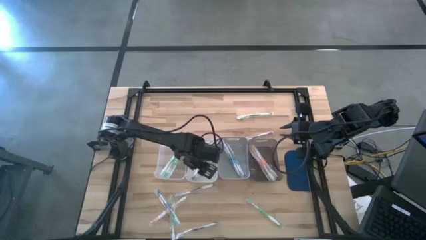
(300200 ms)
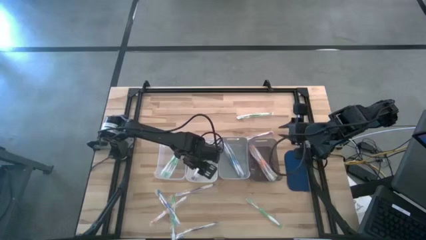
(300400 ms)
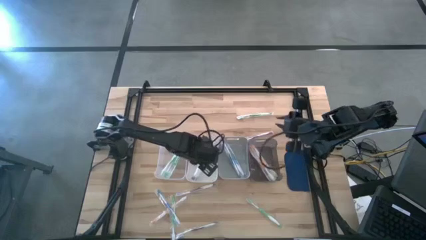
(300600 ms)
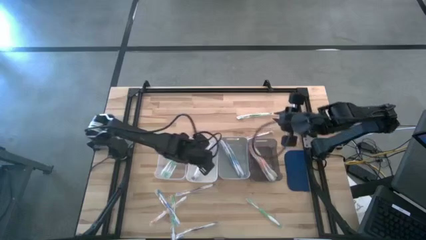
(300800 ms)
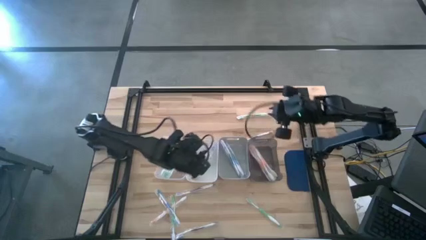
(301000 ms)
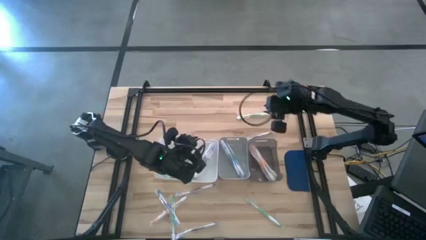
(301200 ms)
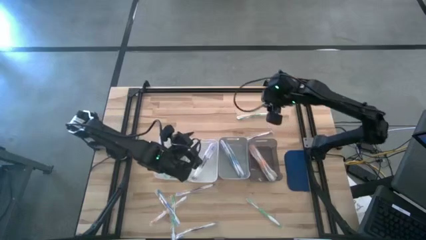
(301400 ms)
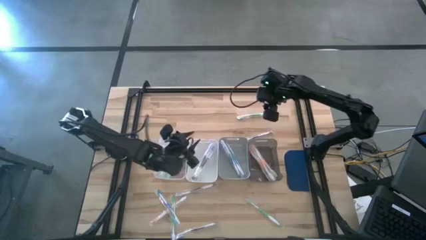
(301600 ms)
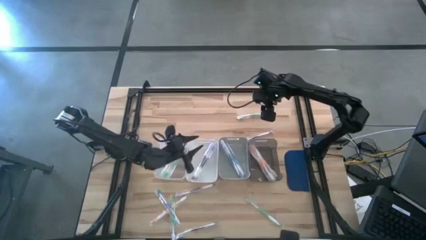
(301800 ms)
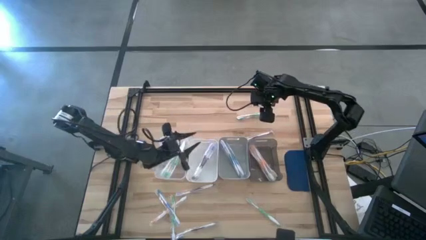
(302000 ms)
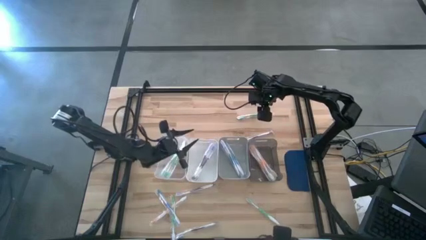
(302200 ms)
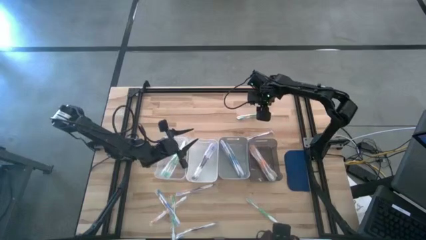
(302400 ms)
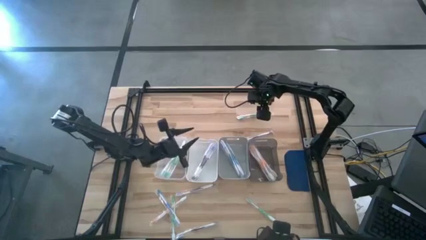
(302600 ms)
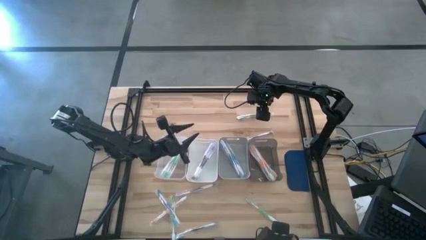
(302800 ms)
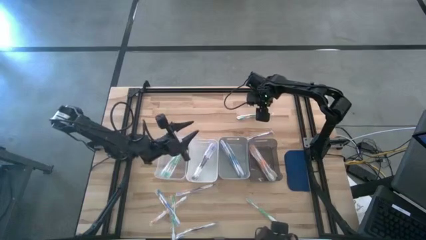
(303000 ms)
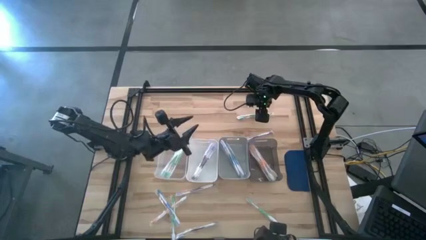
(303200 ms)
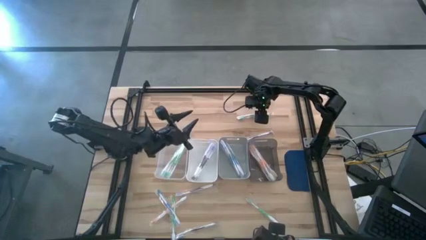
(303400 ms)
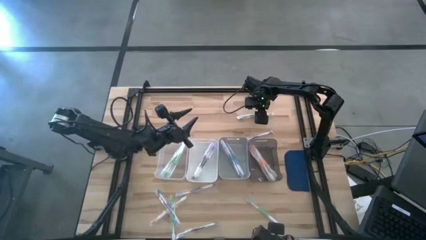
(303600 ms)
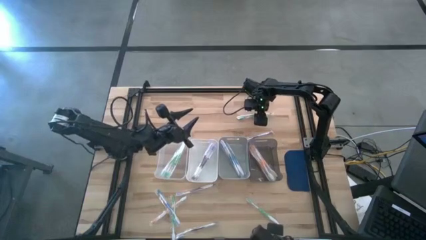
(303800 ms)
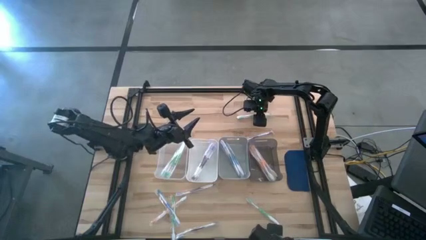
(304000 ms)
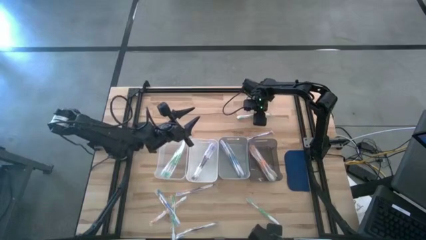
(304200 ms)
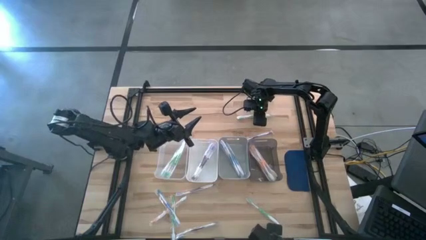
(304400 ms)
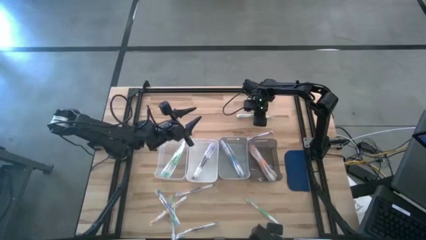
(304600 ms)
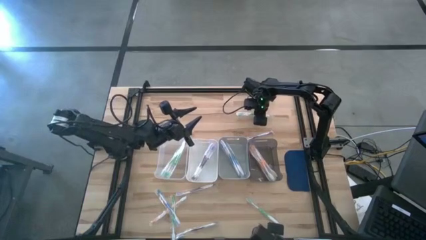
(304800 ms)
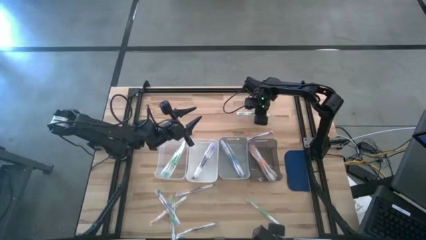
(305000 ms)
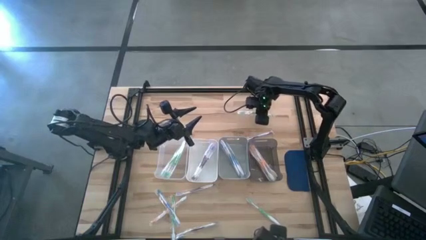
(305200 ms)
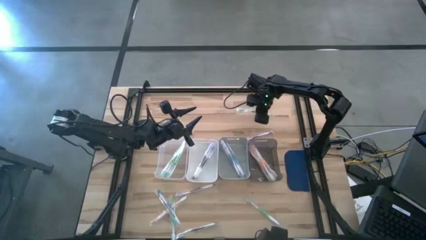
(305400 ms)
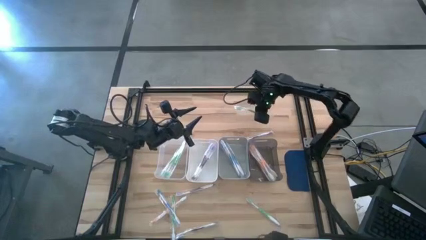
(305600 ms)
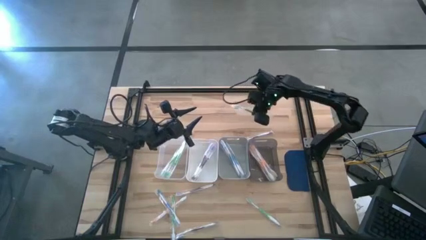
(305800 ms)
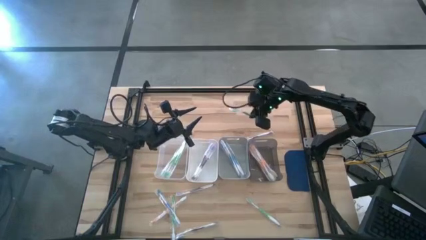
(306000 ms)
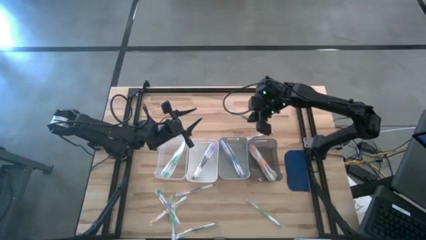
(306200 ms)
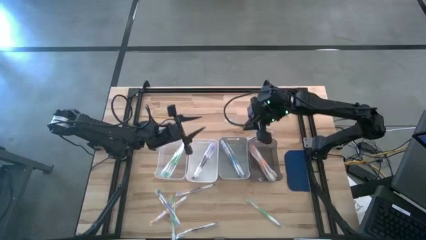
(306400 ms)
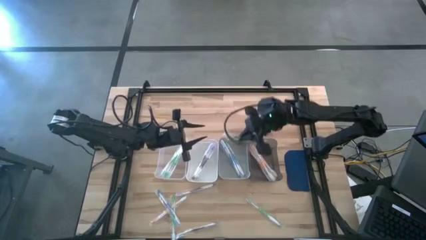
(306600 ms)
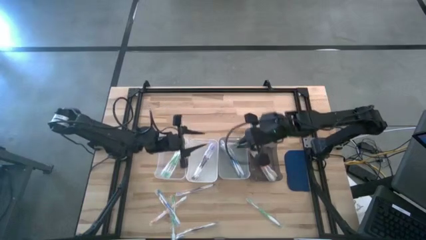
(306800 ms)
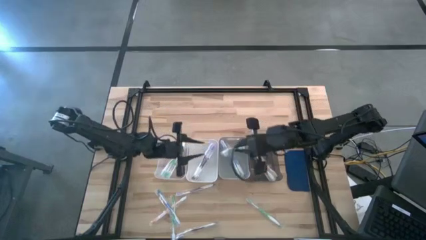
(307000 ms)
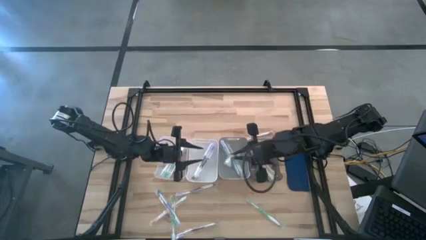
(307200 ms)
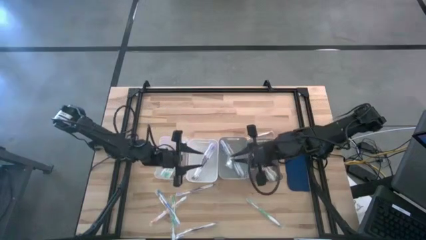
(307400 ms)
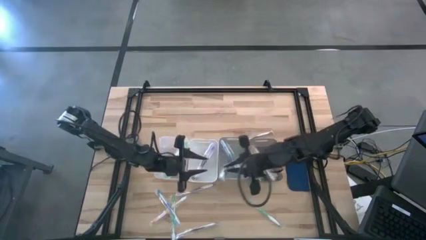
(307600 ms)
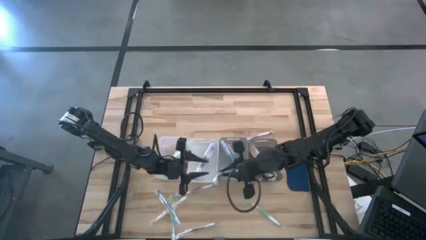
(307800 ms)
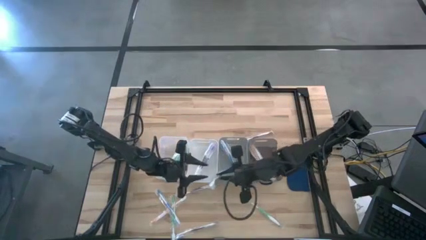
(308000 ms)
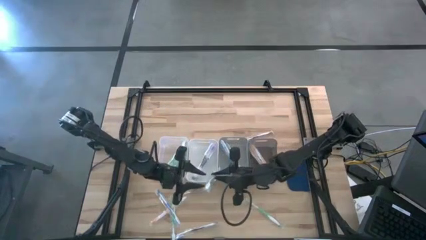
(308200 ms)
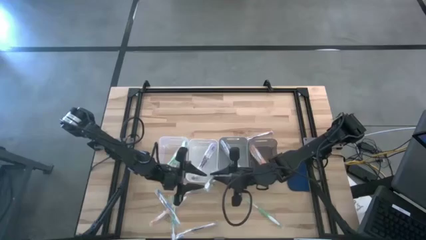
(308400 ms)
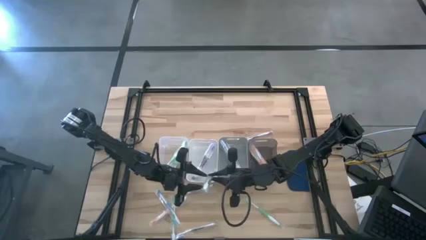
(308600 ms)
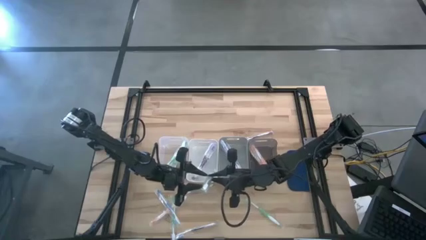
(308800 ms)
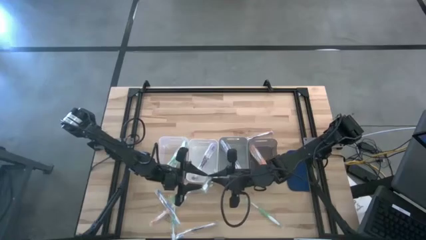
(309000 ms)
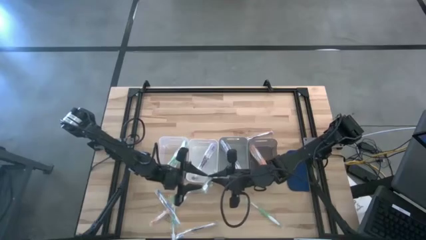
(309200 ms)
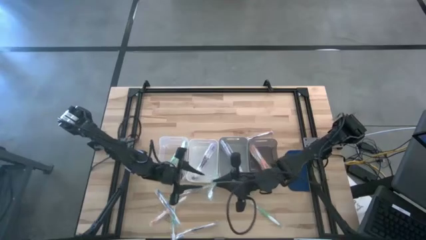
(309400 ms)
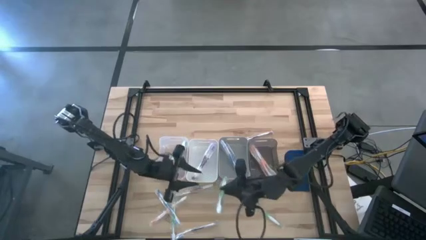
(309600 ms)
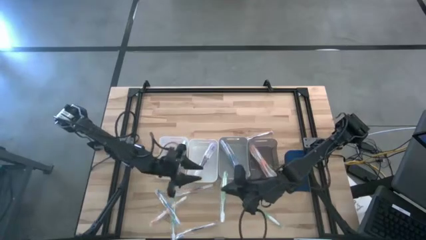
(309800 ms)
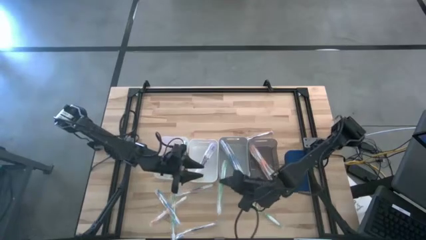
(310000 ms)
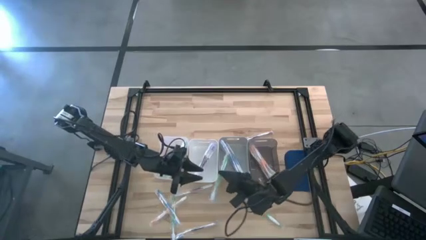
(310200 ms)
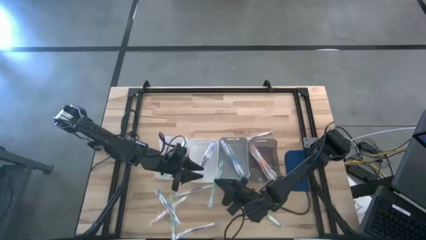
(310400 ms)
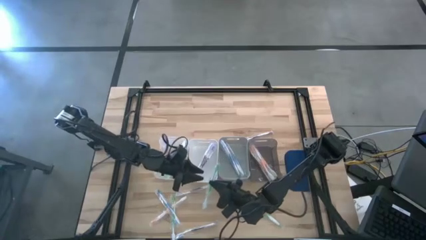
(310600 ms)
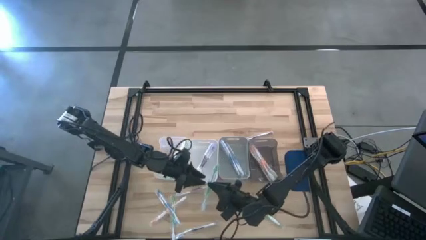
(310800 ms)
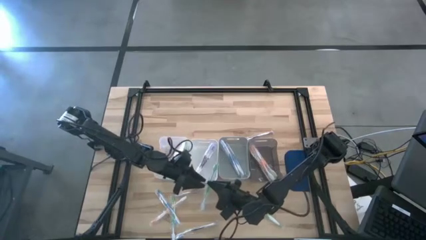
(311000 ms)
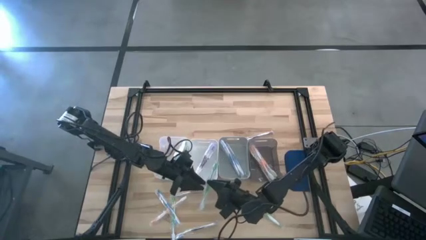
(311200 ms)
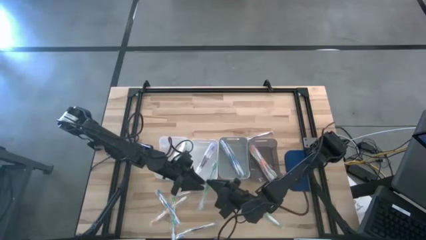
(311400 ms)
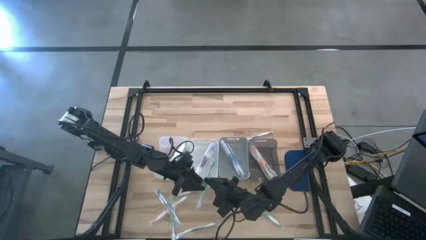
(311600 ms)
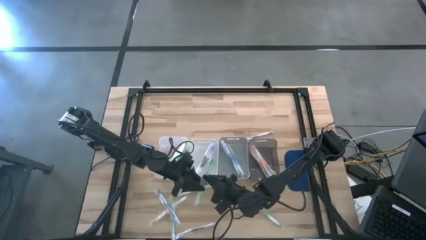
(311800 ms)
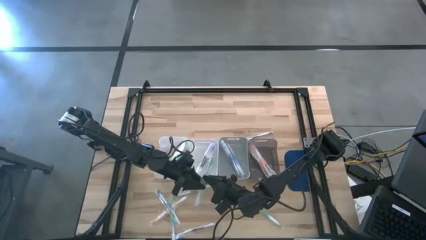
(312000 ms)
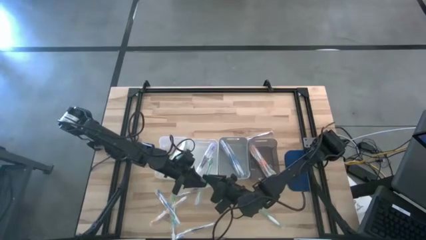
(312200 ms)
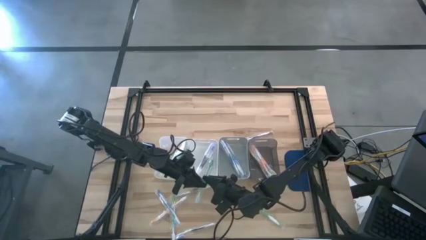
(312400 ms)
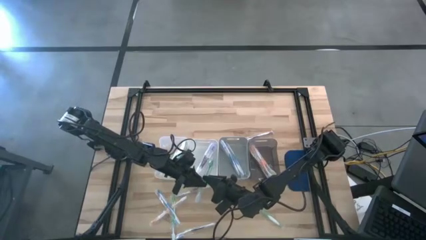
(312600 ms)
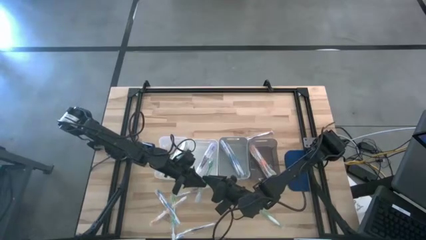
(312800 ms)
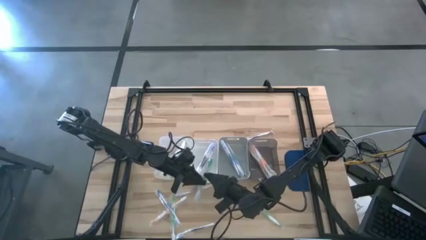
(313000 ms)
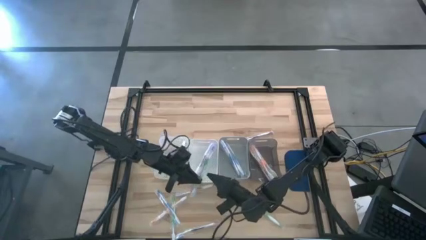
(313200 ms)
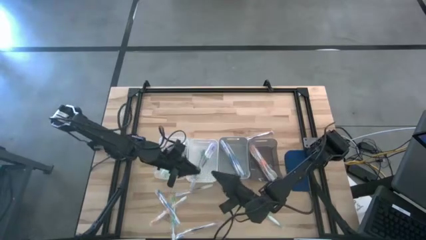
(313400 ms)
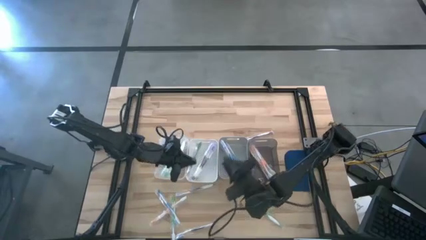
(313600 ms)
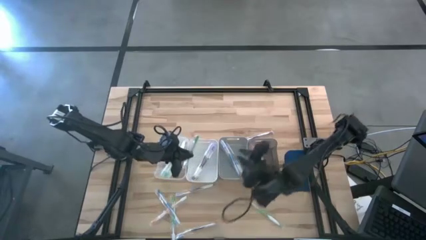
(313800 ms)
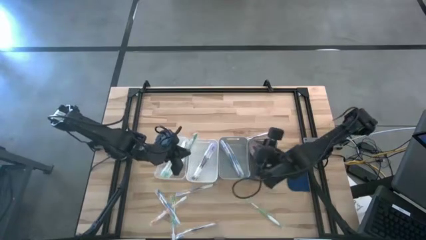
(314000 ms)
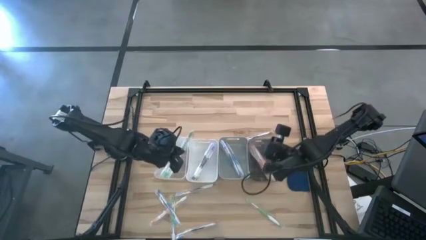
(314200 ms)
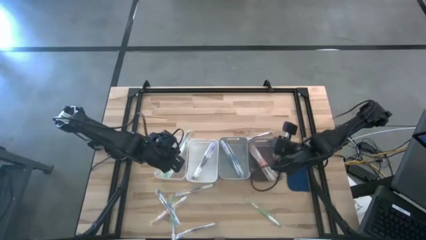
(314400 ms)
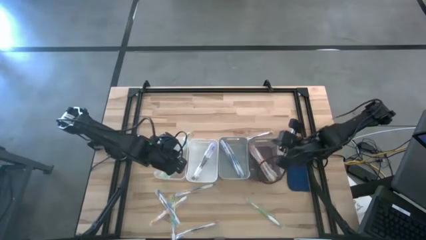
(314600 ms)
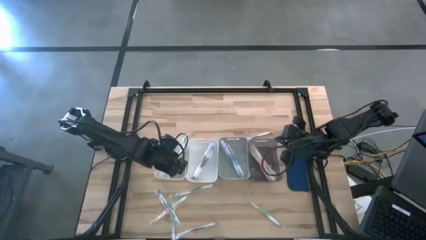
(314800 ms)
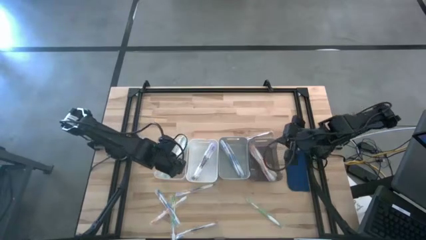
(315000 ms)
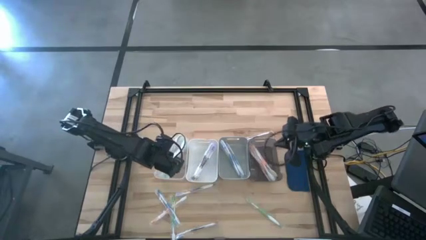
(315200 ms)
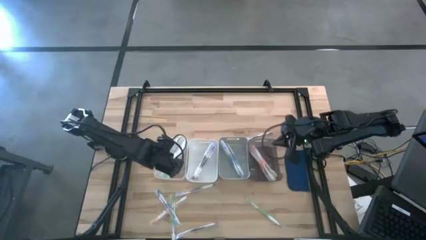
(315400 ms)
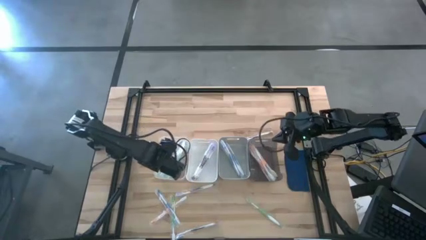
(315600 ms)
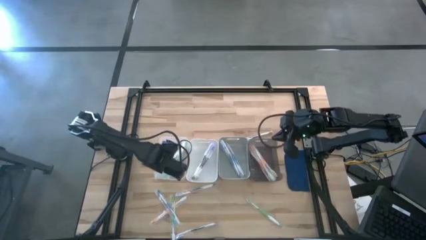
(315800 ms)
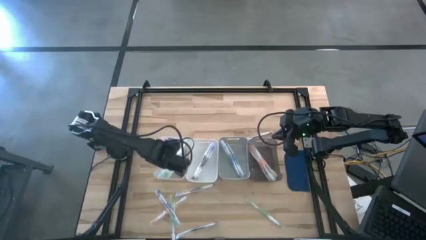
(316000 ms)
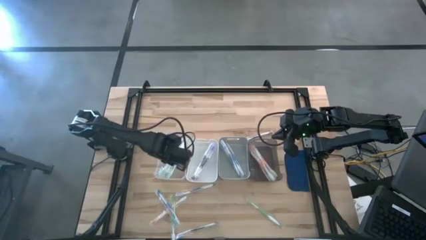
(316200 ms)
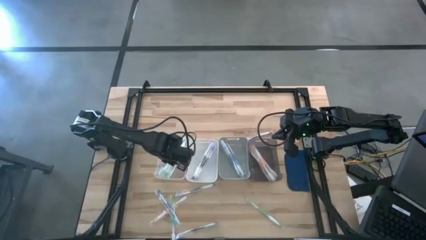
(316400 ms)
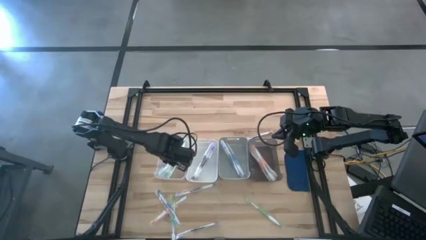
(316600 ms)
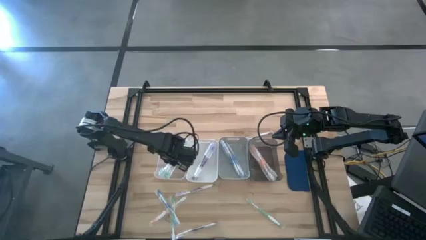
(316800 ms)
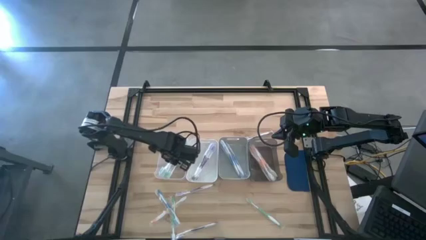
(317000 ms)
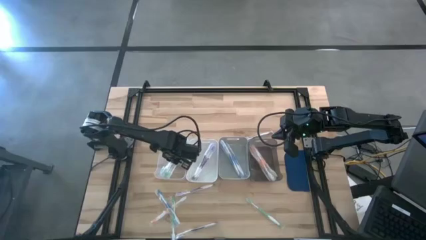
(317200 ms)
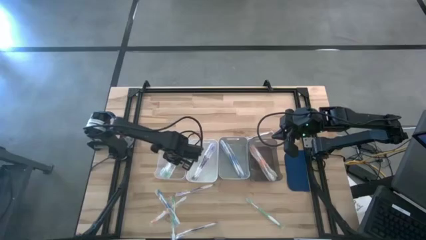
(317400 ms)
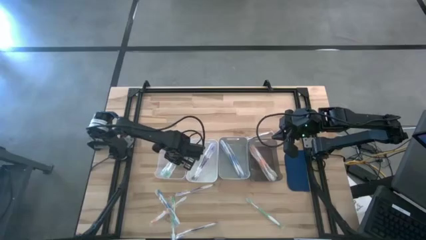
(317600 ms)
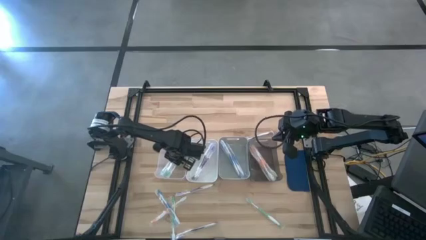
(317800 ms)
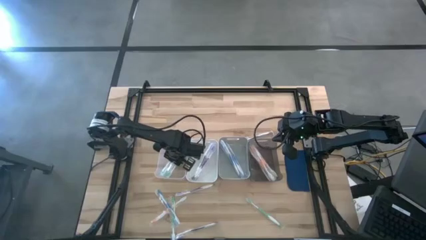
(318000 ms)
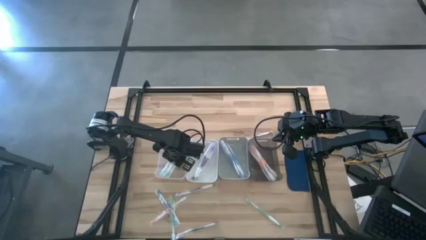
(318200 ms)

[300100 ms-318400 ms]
Task: Pick & Place Toothbrushes
Put the green toothbrush into the transparent bin
